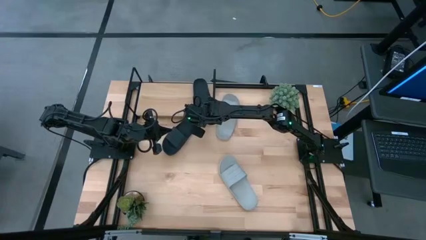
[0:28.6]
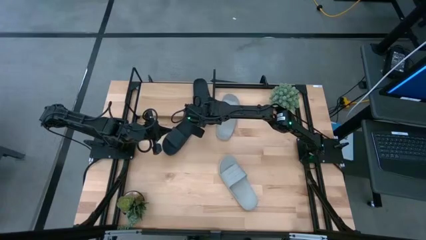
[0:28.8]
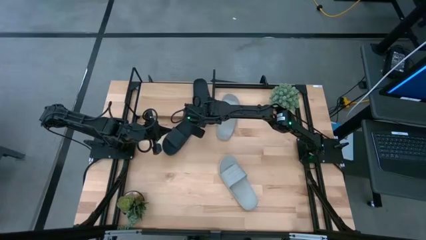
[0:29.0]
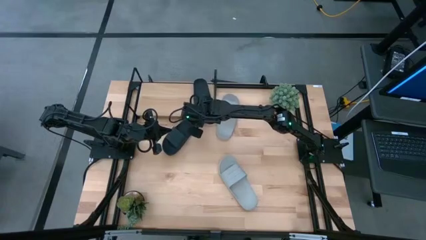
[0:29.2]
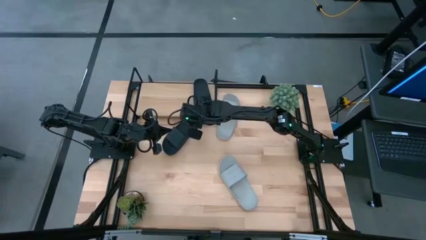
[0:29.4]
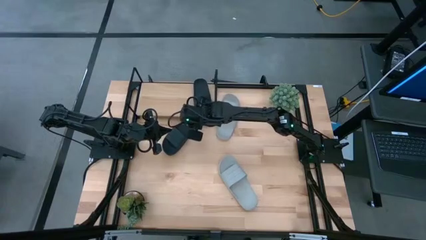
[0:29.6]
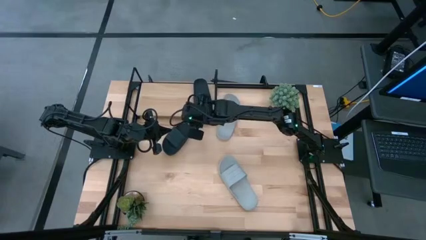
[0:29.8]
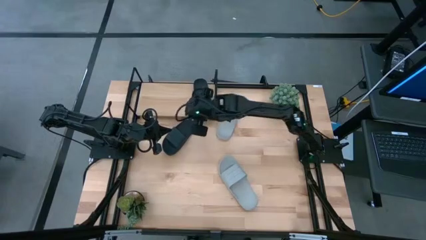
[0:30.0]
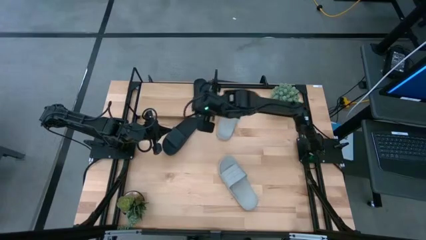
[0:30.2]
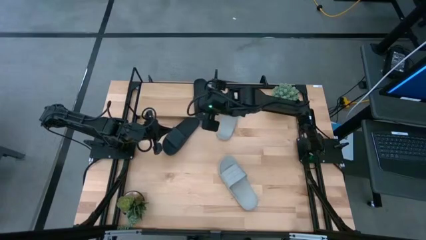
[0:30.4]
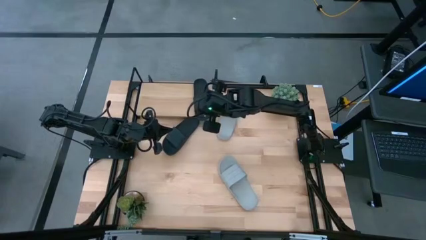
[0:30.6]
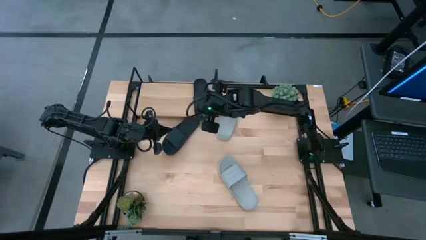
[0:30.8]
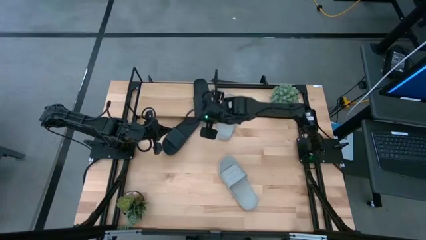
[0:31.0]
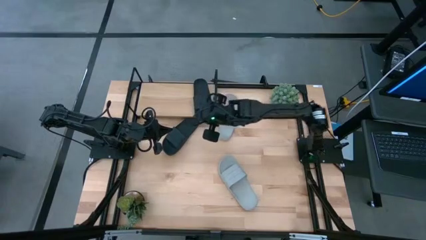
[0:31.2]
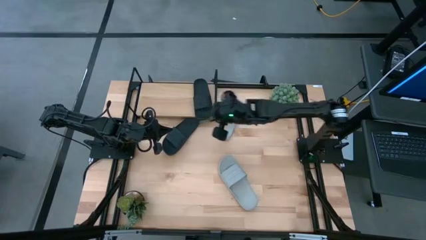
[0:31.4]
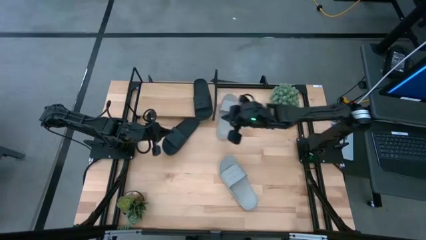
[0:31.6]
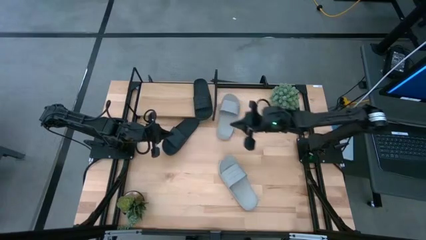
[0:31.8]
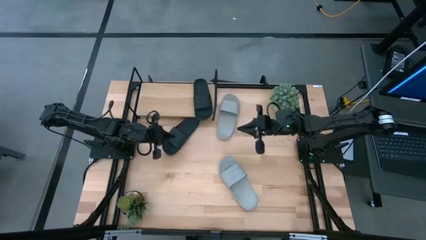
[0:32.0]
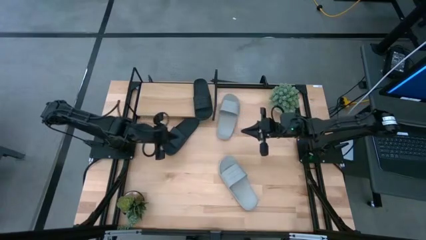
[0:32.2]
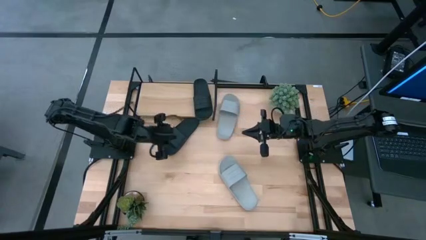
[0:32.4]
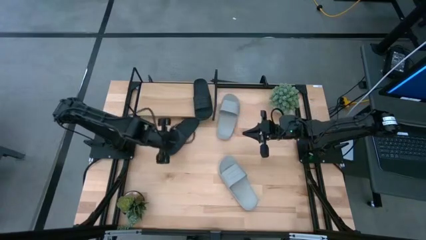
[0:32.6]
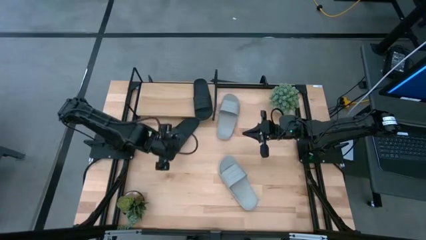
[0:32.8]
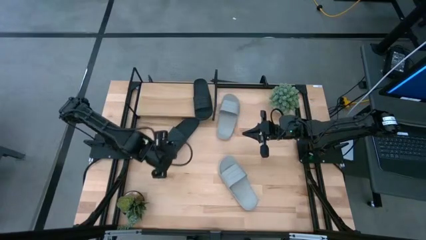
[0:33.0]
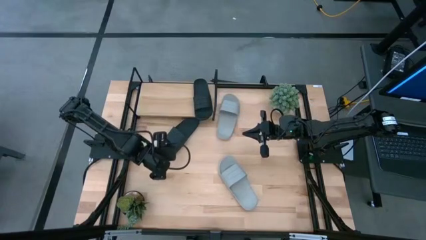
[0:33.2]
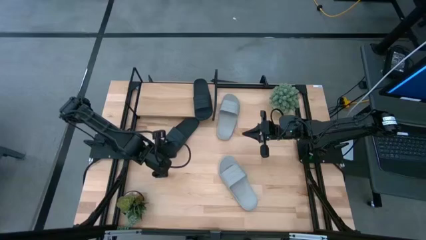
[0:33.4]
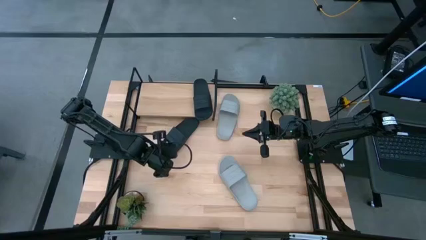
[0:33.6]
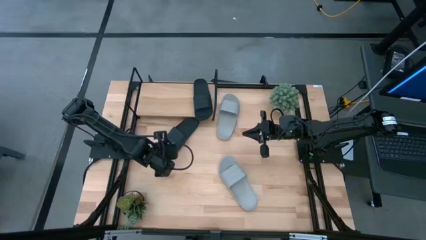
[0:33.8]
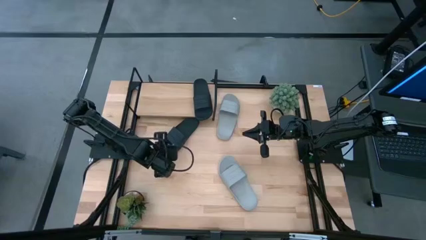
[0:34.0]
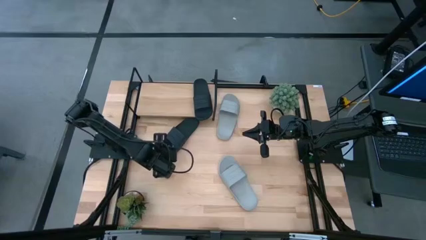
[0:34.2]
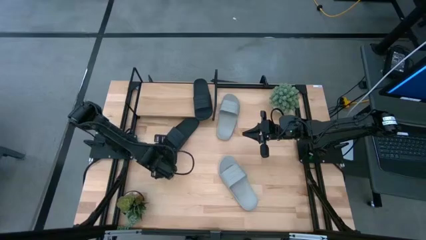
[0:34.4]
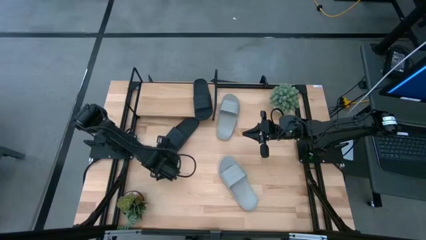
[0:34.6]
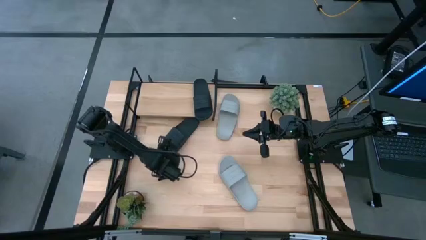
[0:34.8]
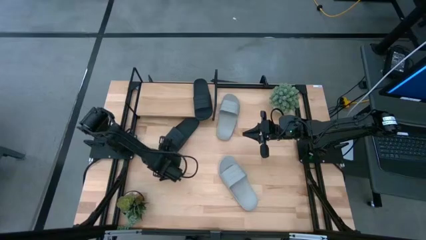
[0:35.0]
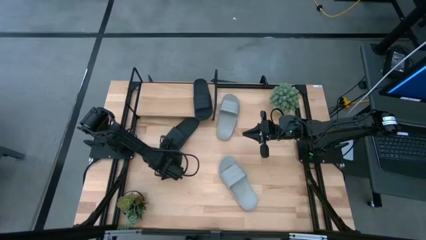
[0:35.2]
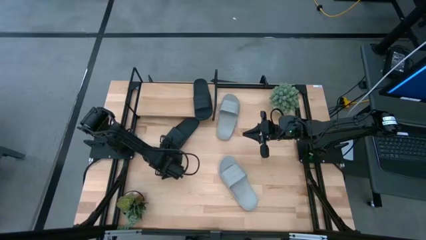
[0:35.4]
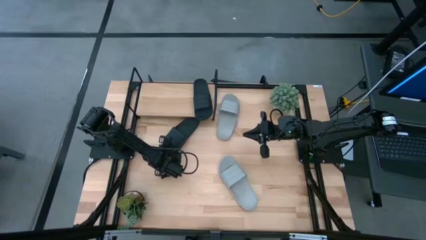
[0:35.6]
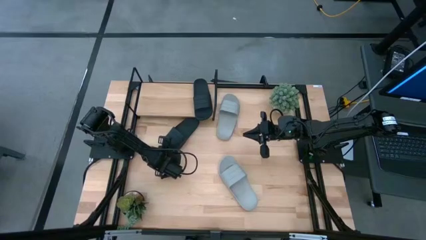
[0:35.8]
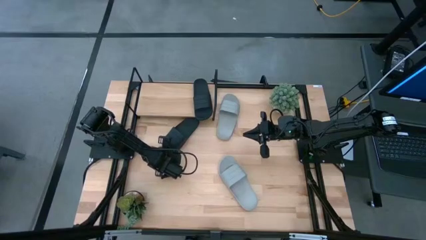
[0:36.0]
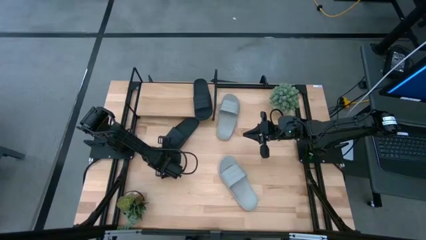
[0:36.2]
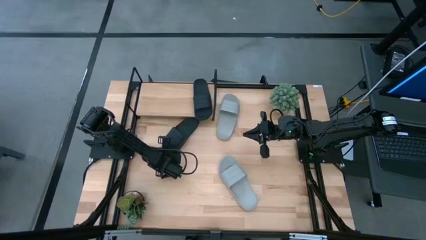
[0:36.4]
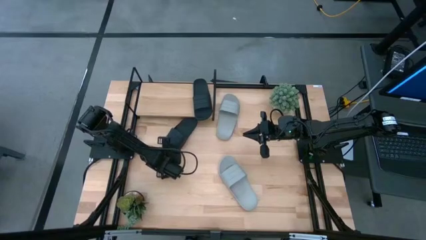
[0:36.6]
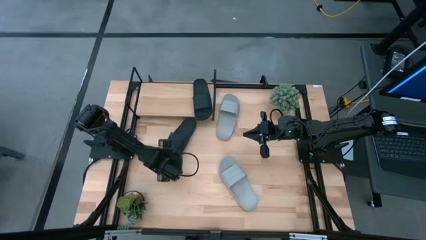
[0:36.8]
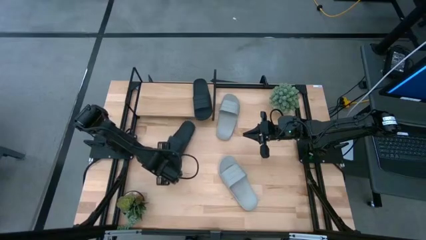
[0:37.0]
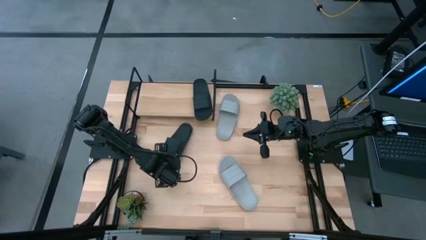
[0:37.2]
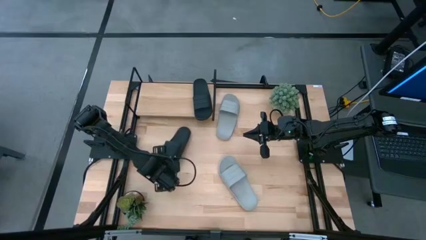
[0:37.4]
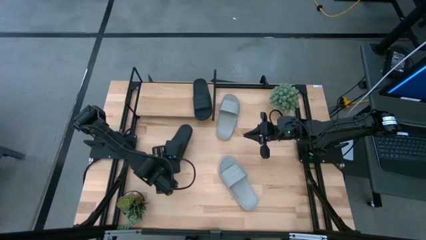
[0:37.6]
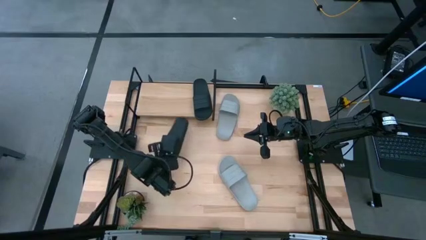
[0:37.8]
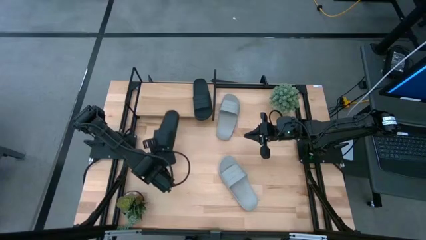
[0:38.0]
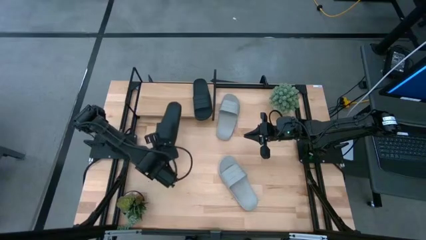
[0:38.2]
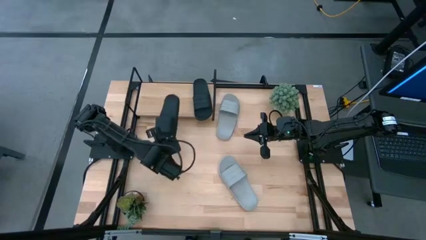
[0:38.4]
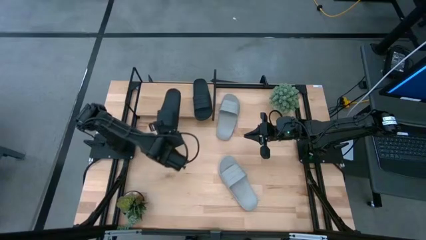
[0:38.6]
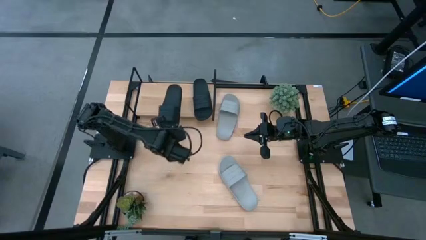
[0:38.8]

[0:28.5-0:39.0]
Task: Pick and place slides into the shelf
Put the black slides on the shelf

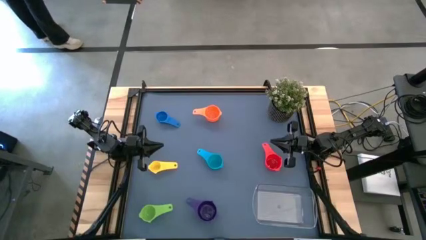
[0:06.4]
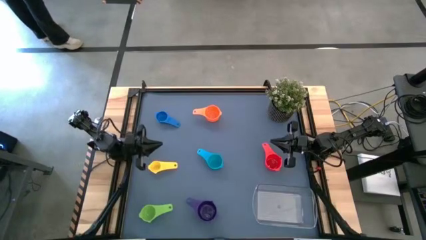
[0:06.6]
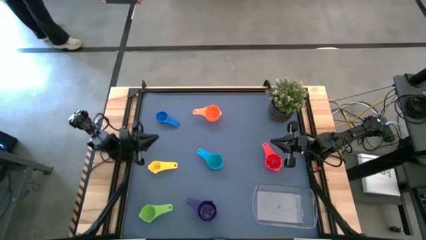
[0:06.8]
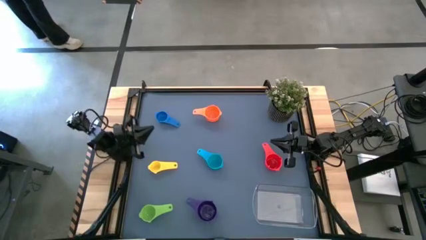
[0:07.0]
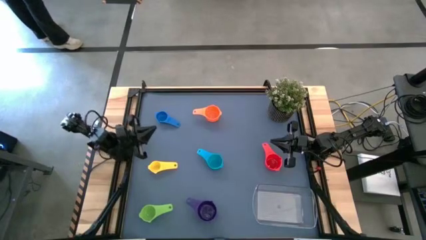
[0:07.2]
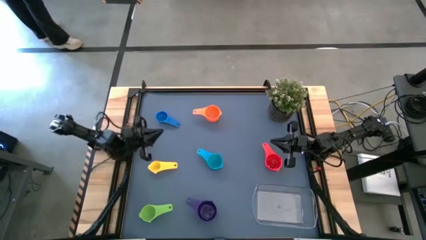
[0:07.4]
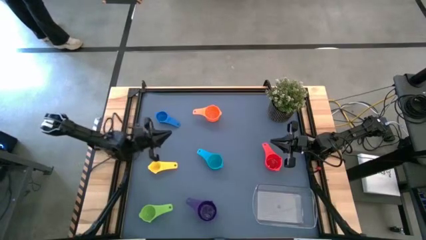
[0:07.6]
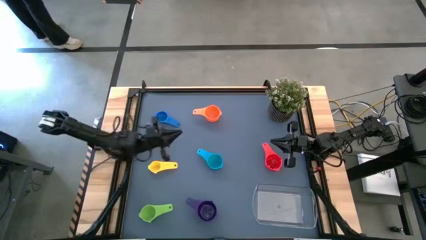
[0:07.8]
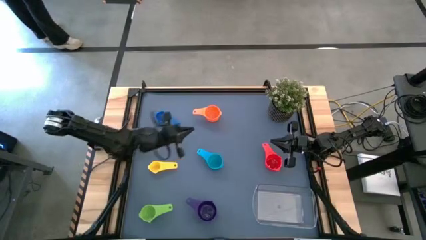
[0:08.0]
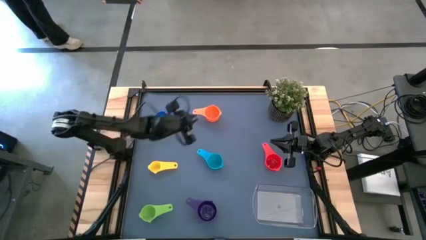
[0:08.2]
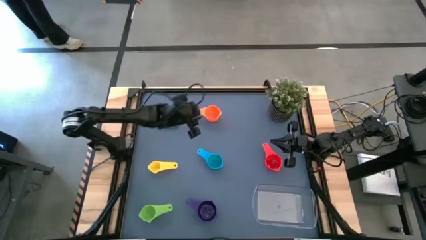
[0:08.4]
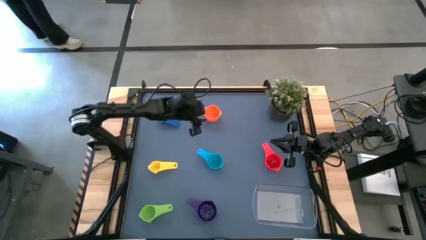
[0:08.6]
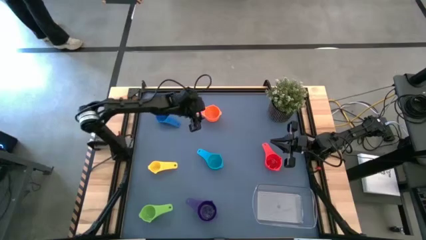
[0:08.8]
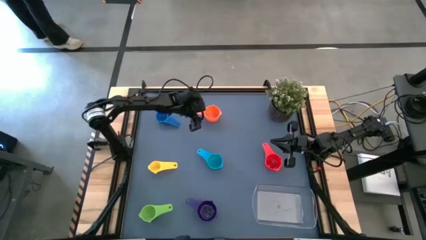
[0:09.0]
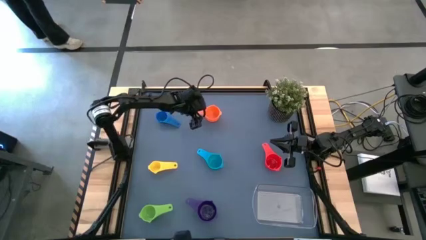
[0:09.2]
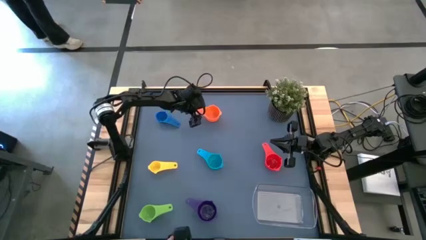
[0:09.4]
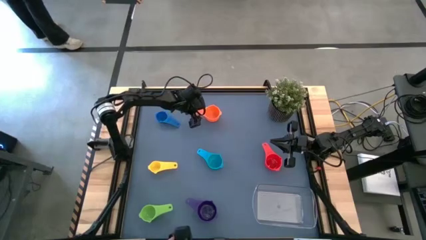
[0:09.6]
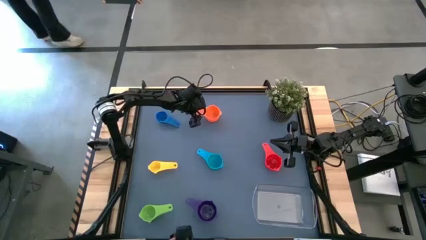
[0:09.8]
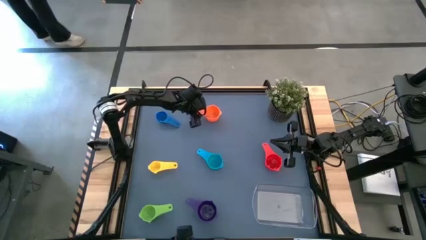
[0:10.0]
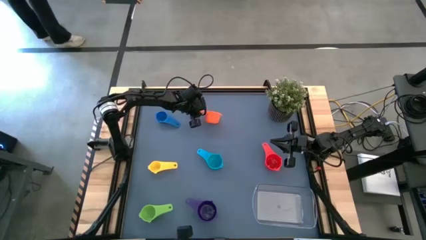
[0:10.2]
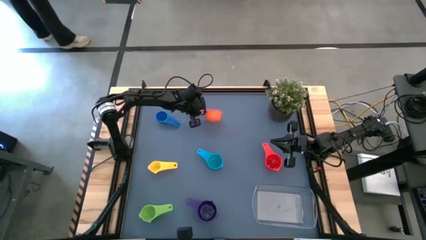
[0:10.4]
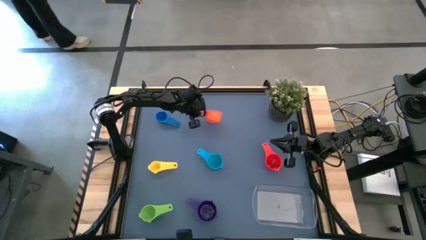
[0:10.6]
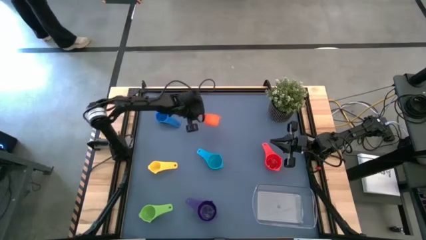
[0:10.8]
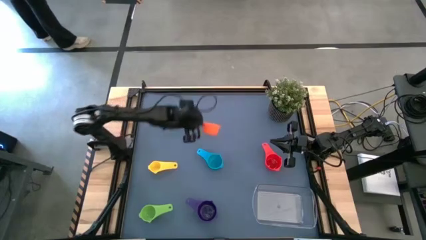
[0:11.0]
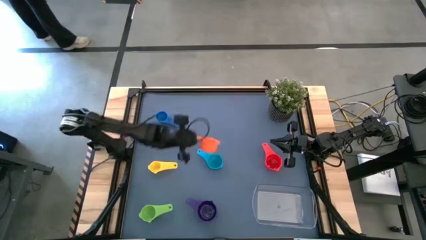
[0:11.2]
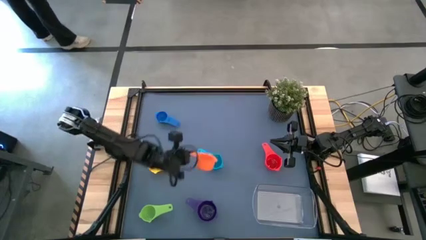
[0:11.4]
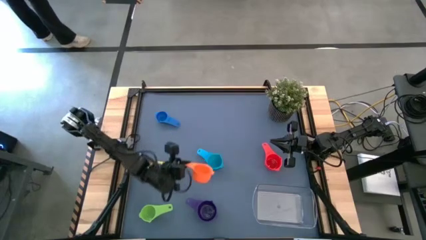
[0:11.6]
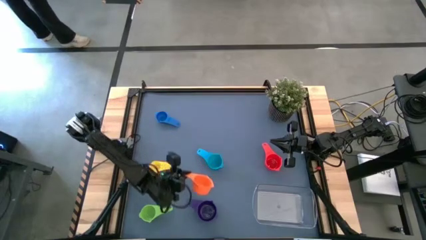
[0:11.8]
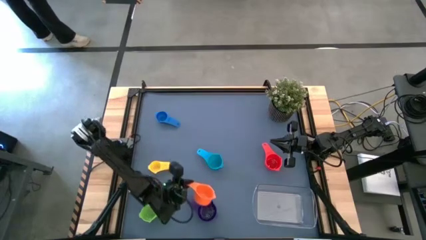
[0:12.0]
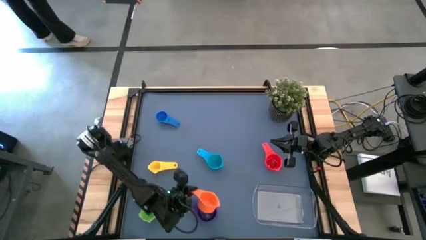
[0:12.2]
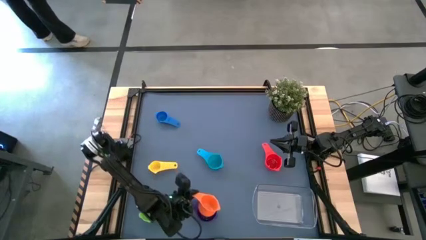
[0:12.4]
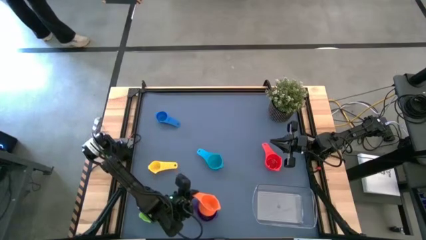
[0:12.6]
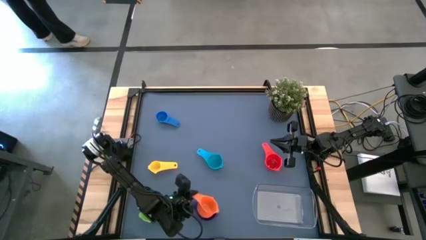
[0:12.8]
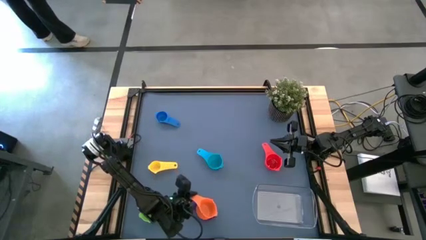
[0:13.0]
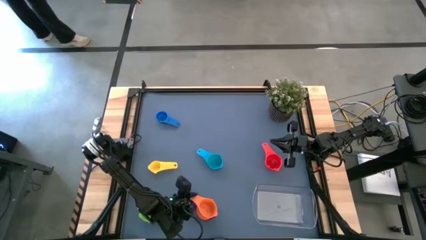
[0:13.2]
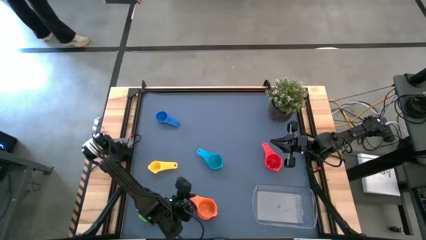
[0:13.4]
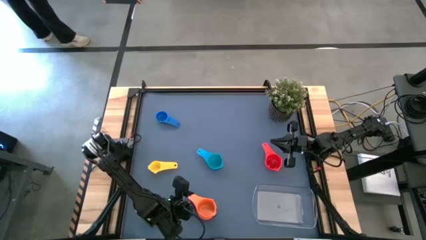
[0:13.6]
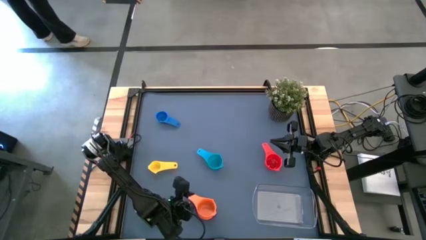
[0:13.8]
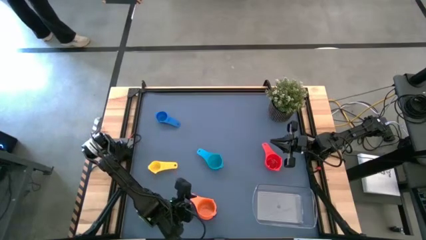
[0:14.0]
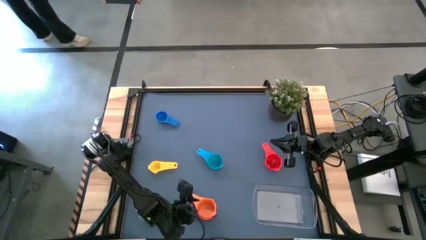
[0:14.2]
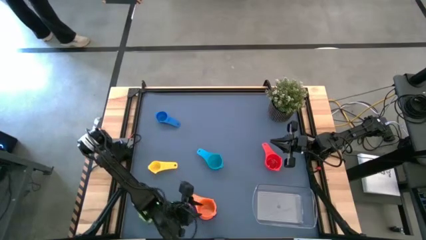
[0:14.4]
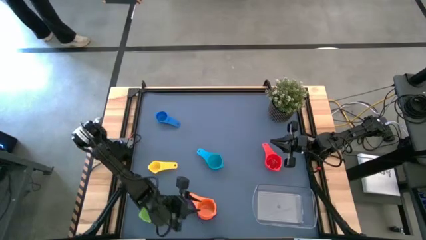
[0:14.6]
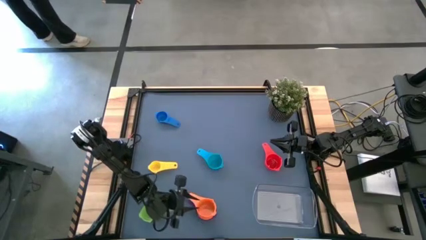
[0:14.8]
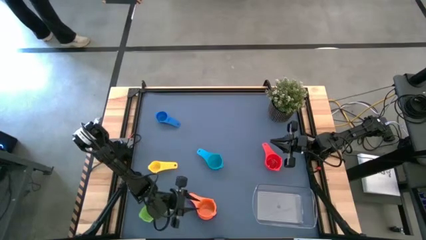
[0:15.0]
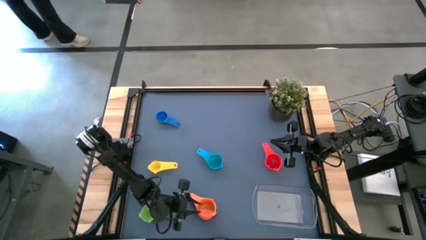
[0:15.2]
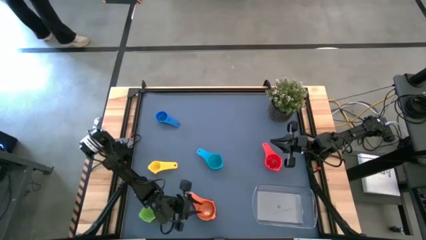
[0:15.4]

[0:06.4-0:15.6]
Task: Nest measuring cups in basket
Stack the orange measuring cup on top of the purple measuring cup
